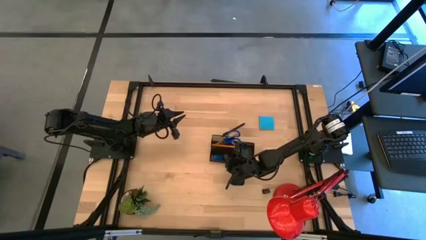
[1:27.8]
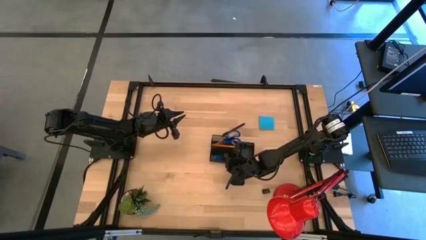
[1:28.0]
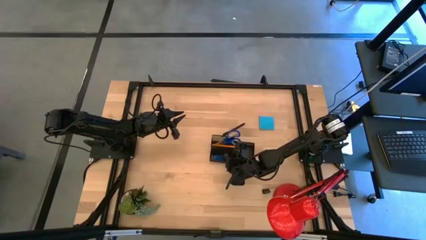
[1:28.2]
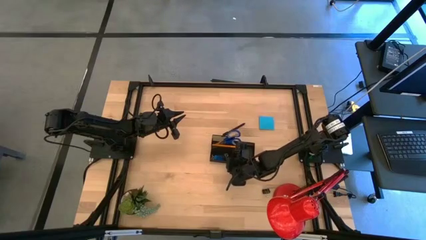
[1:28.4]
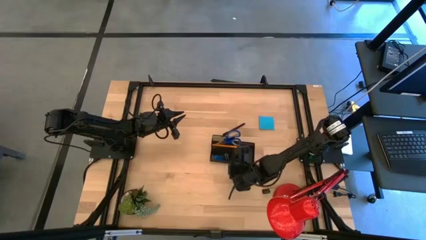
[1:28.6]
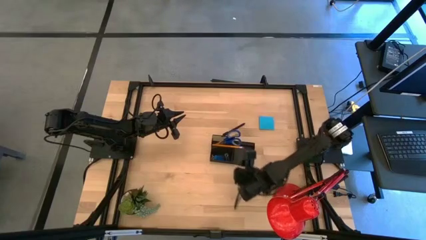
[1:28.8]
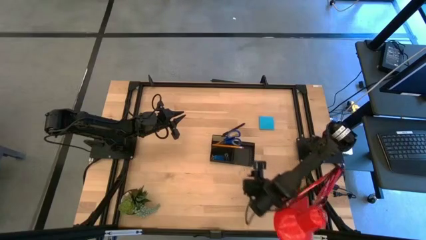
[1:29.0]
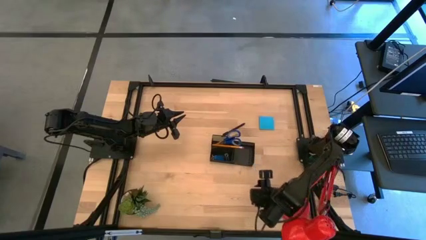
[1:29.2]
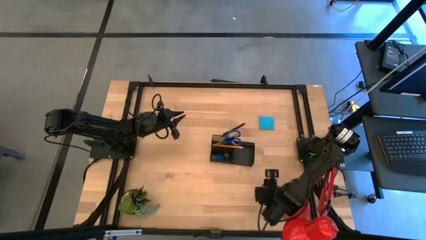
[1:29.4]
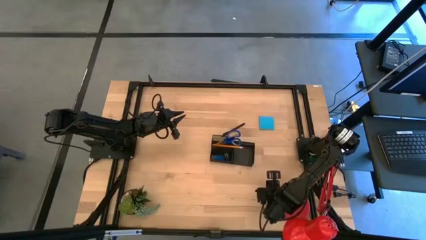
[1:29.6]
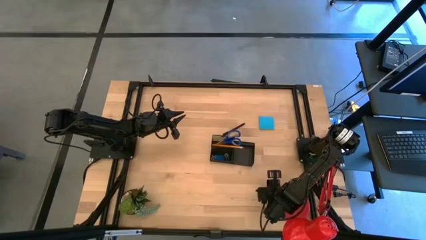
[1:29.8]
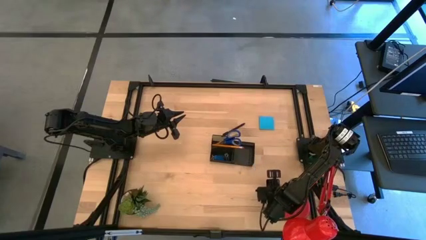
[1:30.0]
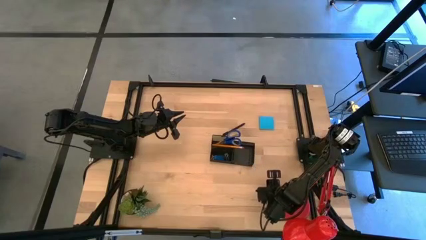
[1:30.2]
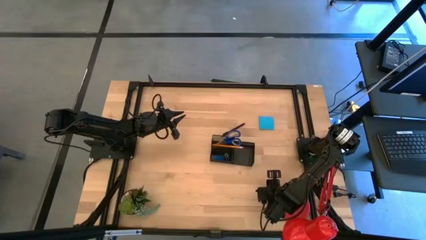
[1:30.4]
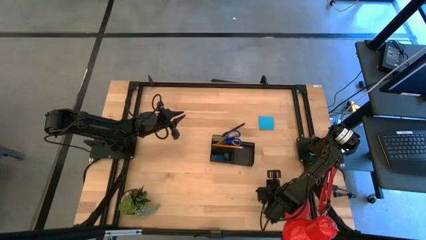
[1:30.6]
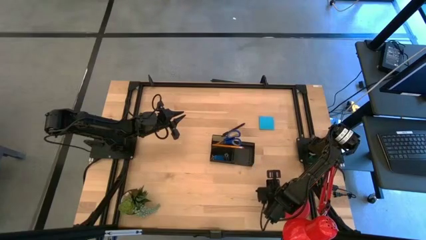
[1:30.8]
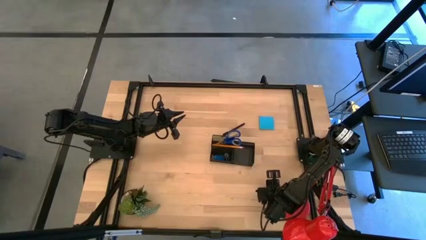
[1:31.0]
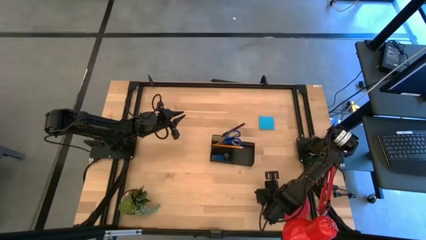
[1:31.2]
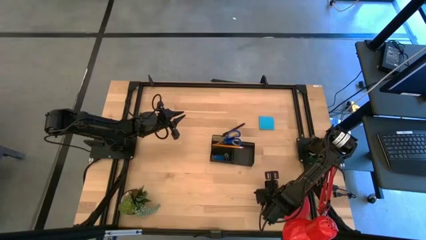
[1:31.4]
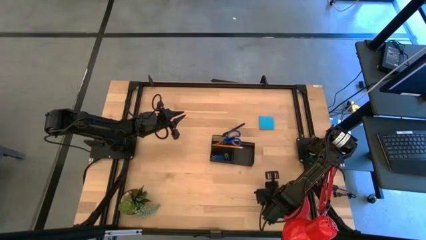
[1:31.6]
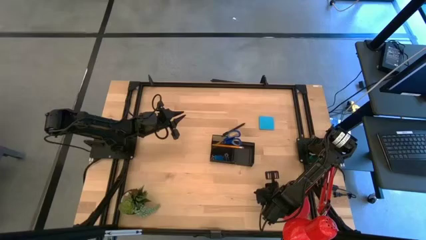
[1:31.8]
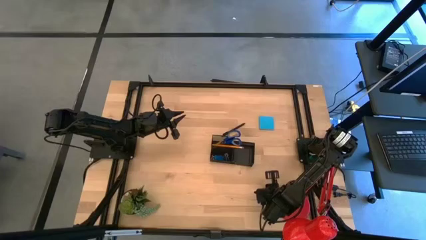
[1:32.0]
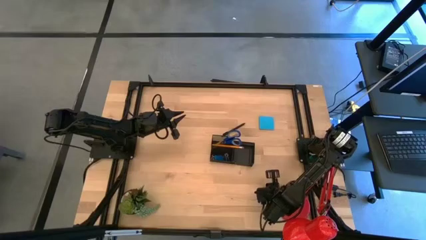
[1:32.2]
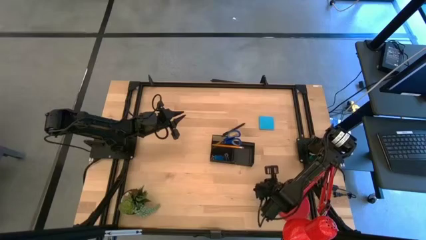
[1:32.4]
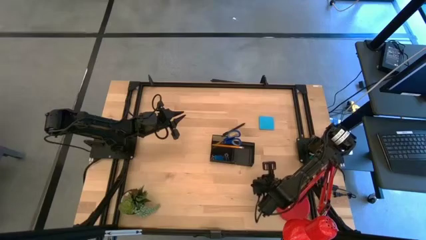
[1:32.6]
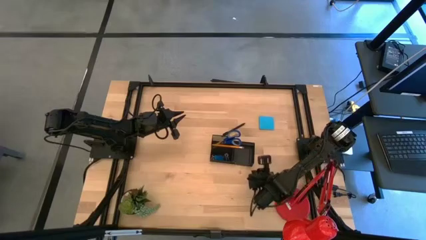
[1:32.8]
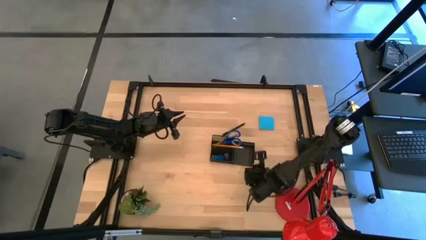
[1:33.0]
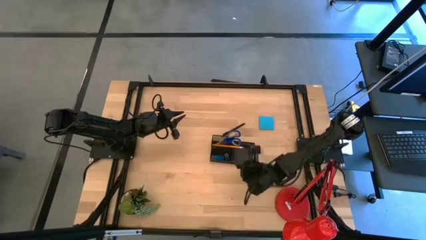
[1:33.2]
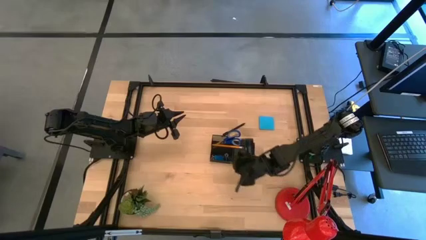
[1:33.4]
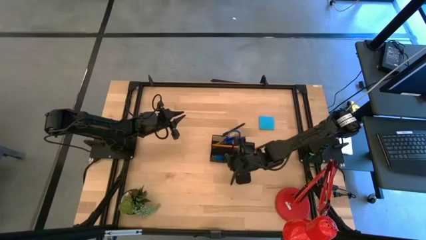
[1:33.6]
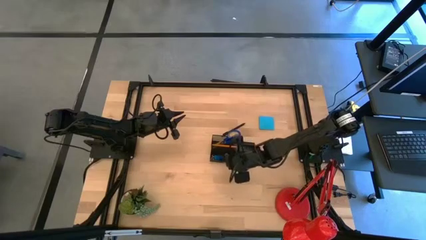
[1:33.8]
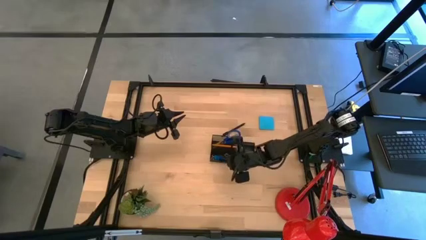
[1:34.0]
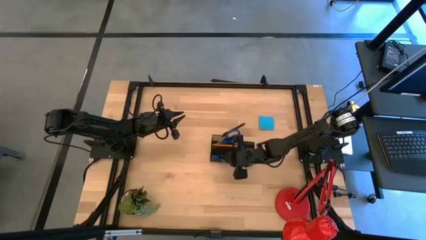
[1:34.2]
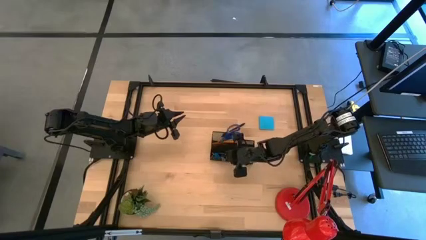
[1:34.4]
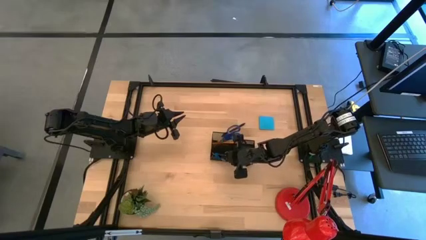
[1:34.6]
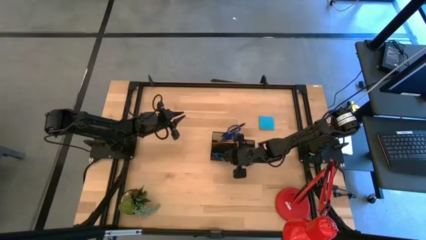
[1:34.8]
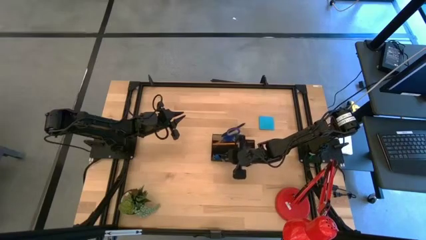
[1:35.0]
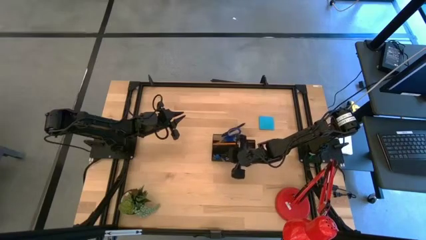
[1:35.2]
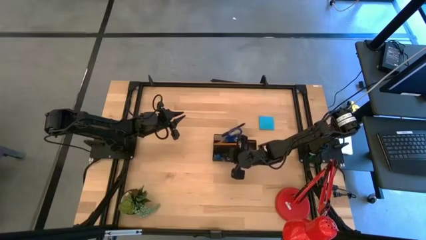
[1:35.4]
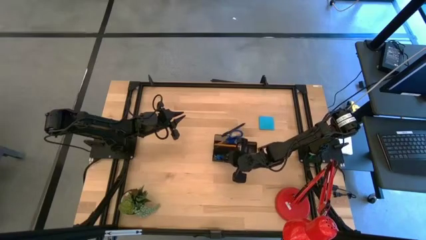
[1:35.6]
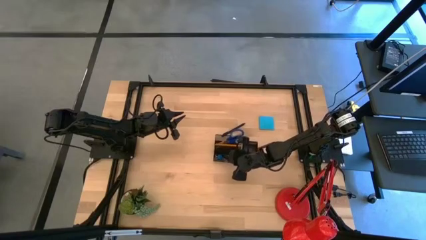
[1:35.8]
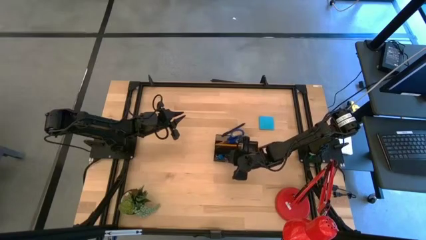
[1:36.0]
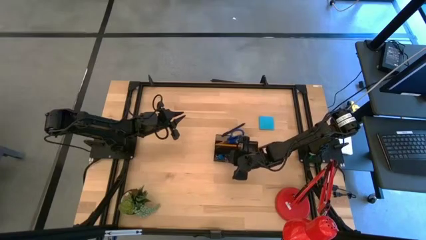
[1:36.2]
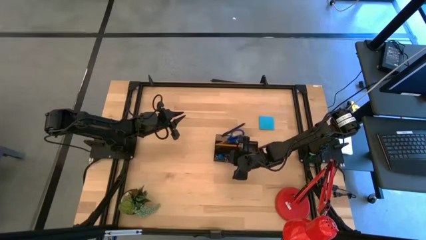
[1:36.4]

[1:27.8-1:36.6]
Task: Pick and place office supplies into organizer
Put the black binder clip into the black desk organizer

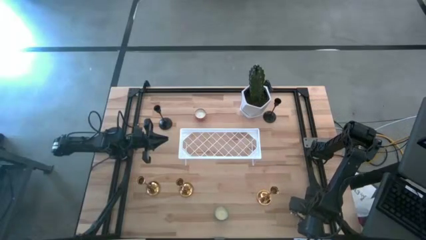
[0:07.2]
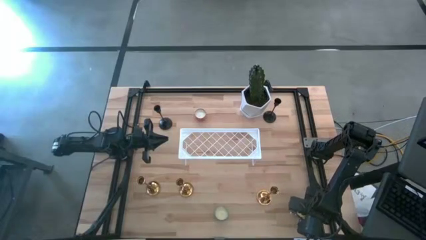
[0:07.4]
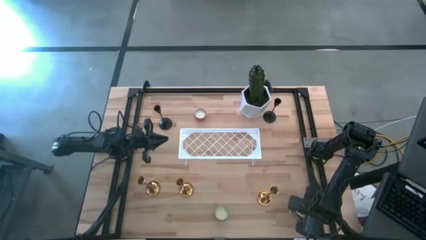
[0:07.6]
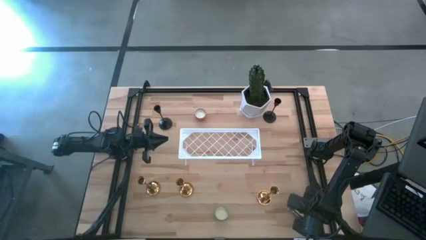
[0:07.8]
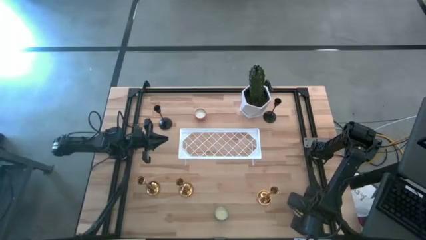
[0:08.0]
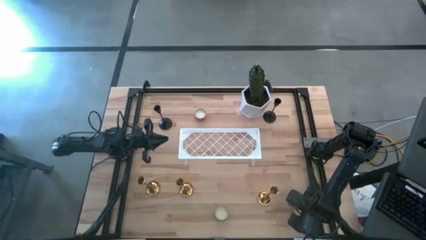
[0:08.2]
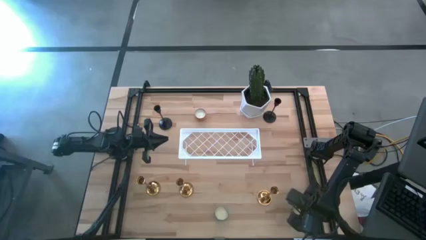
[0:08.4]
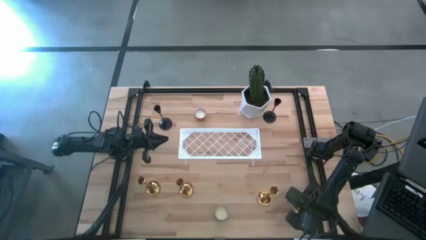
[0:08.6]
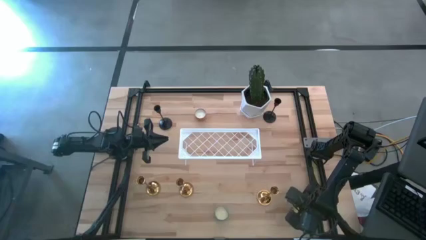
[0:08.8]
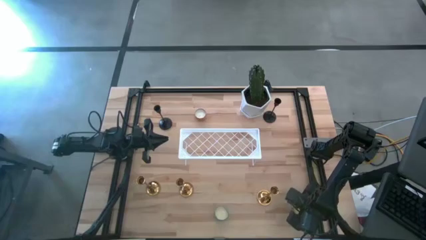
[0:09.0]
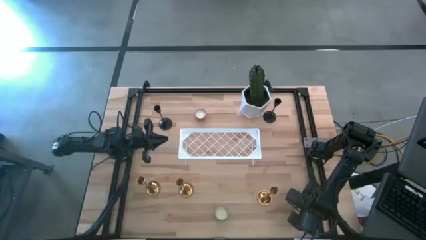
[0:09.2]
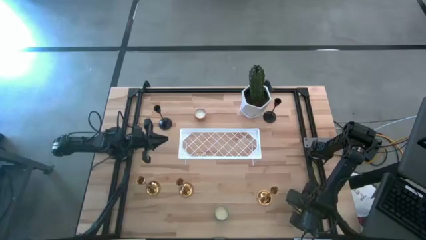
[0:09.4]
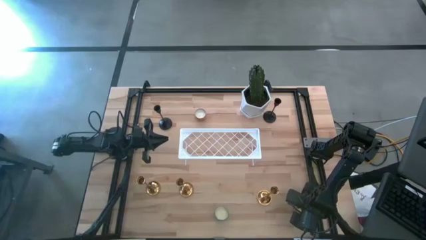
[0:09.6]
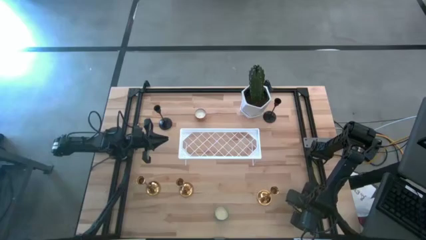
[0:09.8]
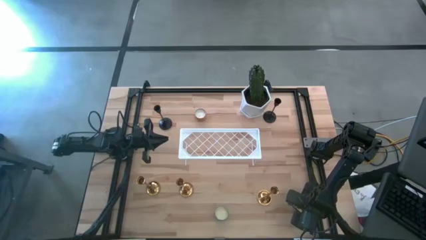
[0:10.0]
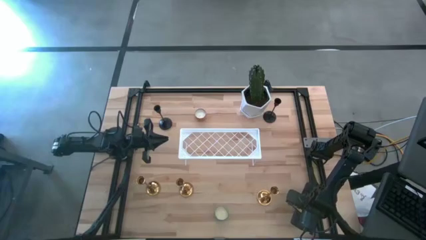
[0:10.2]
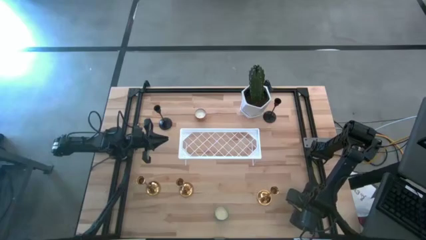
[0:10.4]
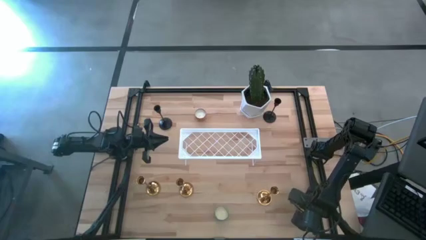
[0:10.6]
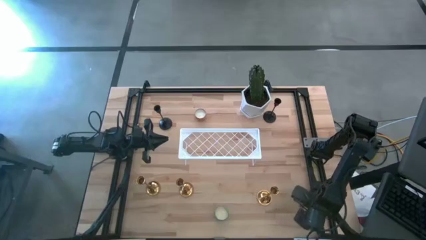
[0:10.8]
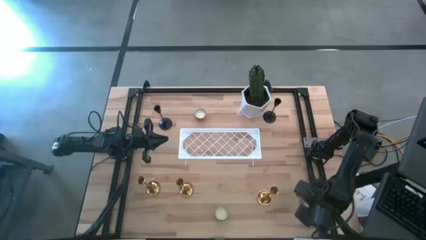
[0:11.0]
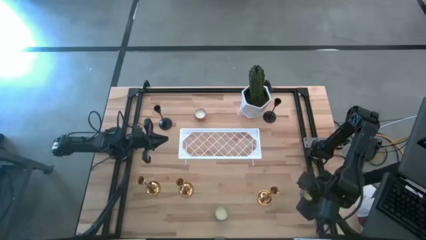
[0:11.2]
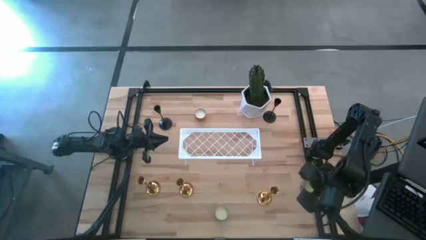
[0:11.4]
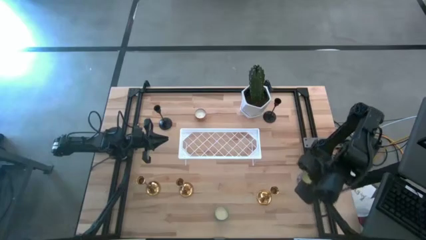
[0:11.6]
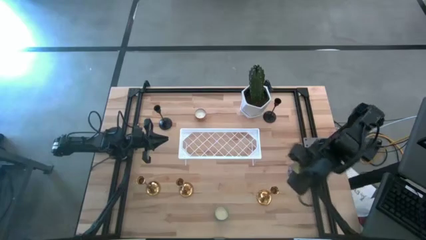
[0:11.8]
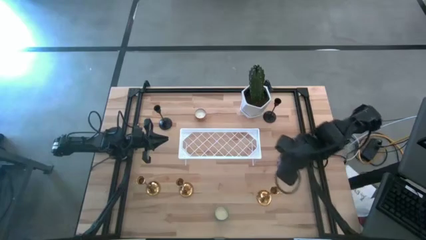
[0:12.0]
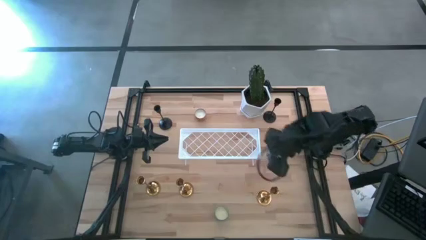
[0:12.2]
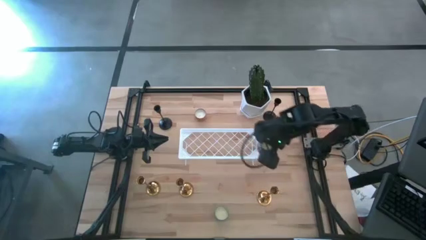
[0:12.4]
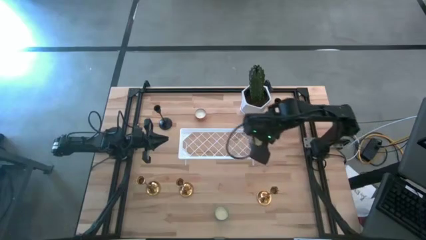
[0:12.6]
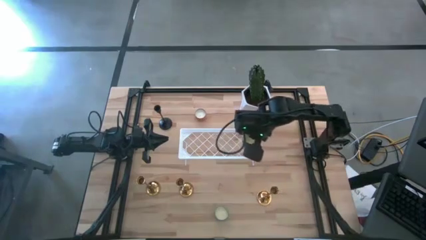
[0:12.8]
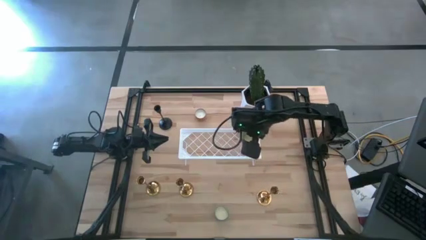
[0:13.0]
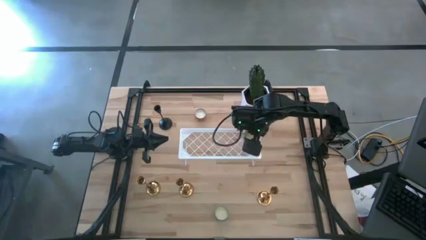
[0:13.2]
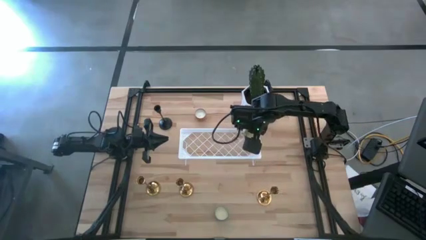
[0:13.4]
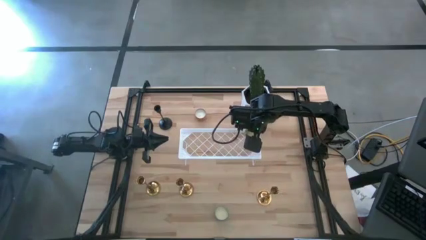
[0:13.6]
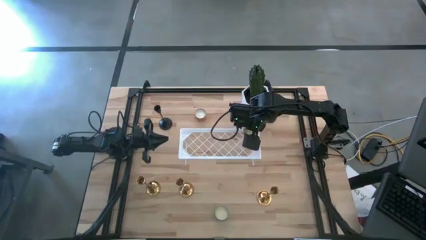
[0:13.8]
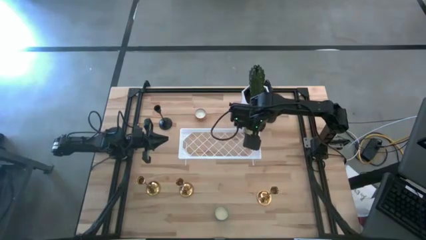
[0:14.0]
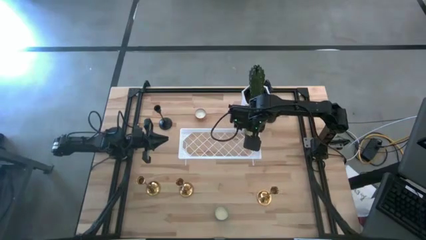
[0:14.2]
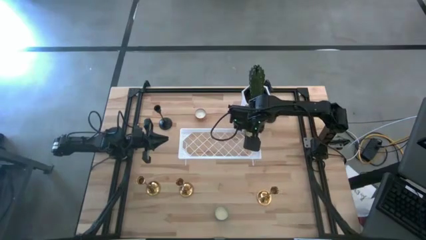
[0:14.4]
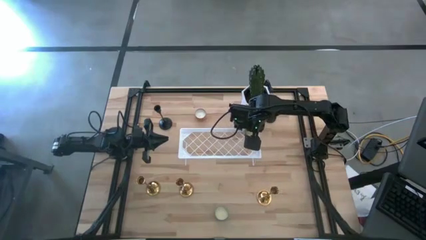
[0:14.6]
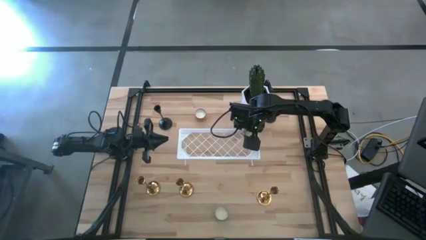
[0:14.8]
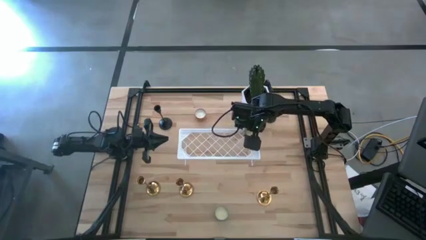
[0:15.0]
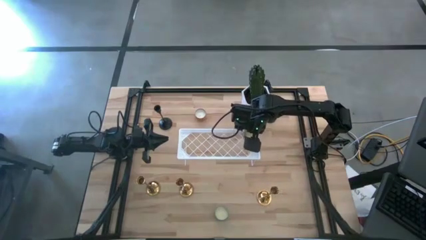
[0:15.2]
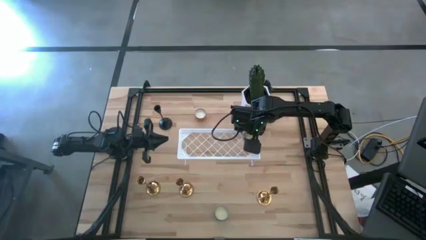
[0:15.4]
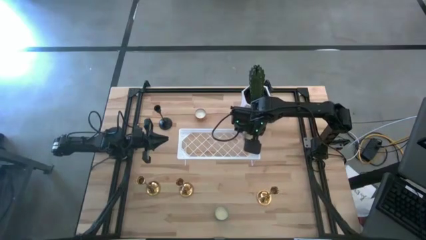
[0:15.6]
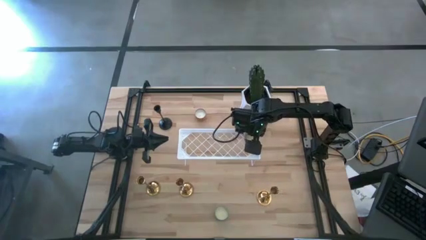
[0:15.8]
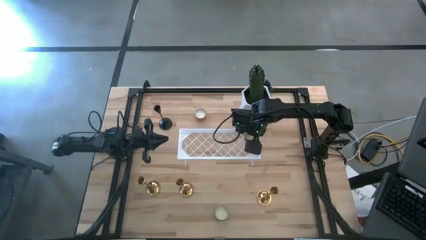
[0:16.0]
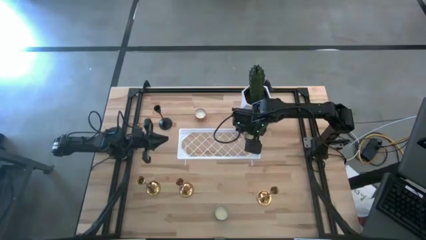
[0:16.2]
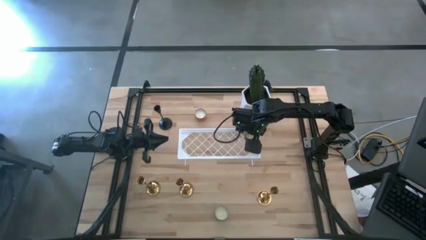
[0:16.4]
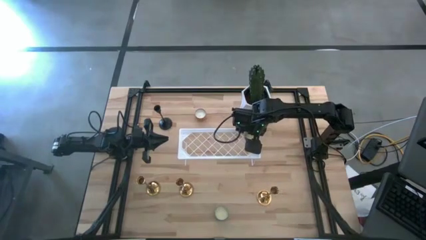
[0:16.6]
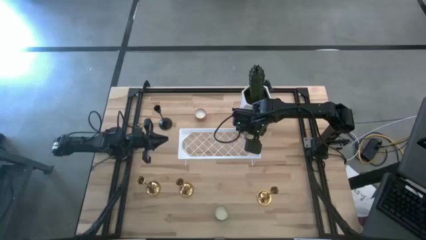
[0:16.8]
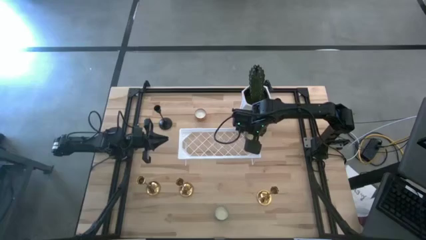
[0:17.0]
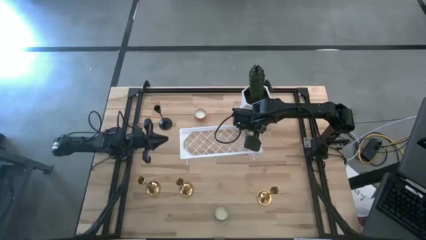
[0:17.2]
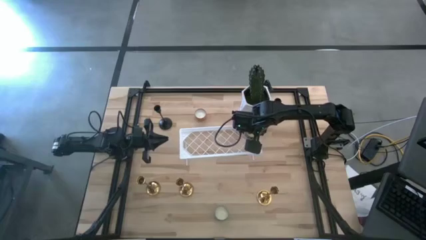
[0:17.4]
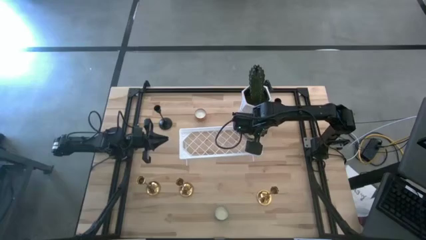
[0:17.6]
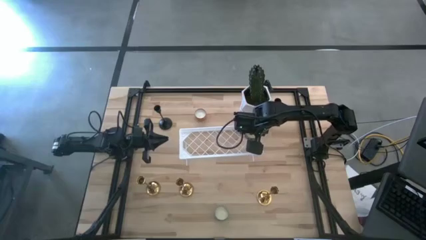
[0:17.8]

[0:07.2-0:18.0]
Task: Pick & Place candle stick holders
Put the red scented candle on the shelf
